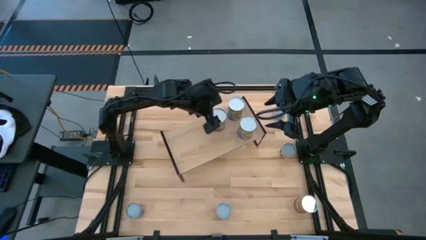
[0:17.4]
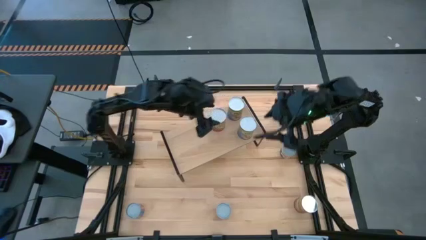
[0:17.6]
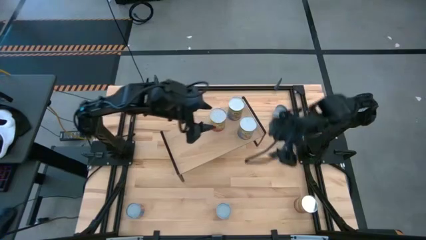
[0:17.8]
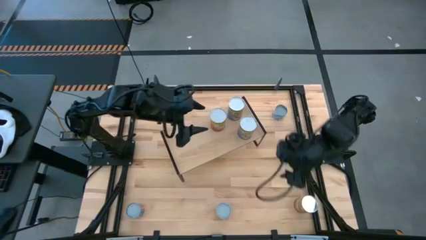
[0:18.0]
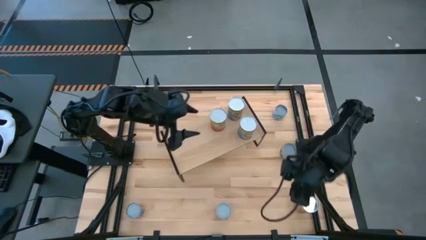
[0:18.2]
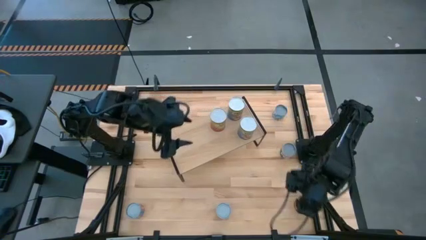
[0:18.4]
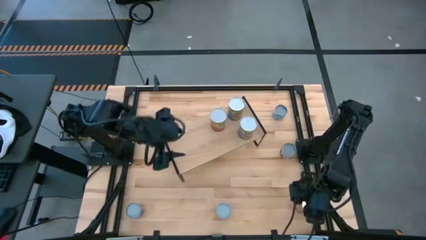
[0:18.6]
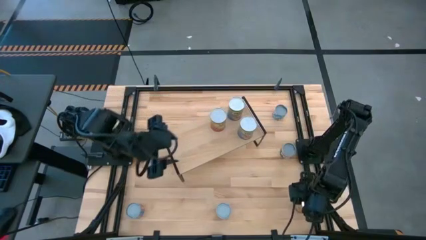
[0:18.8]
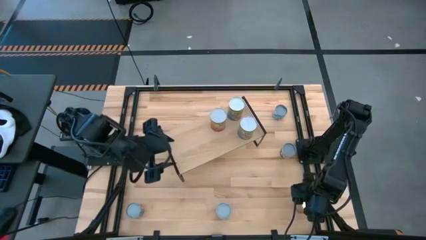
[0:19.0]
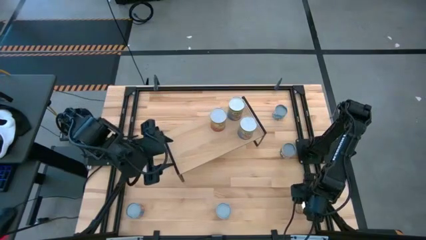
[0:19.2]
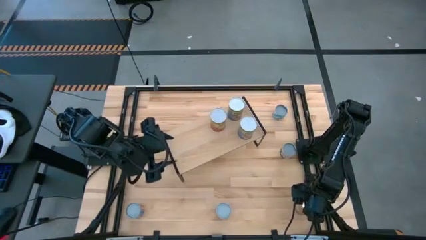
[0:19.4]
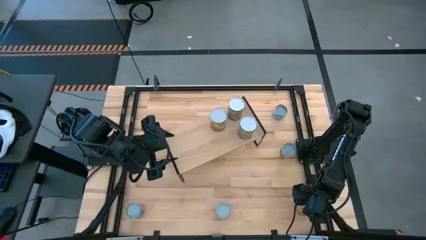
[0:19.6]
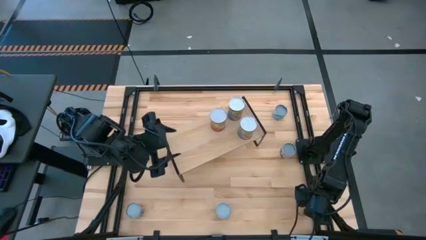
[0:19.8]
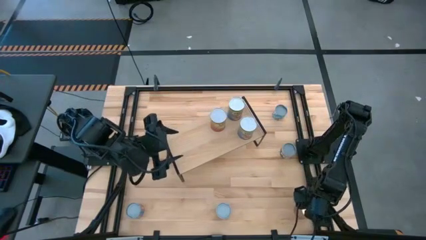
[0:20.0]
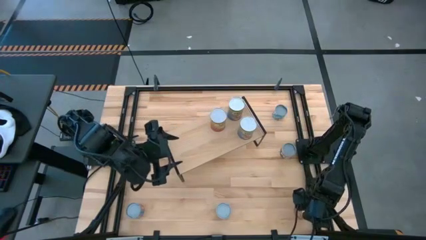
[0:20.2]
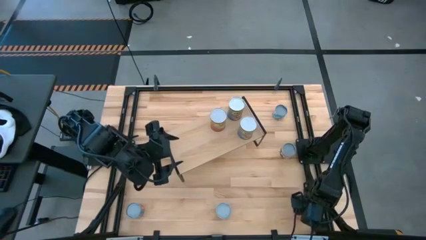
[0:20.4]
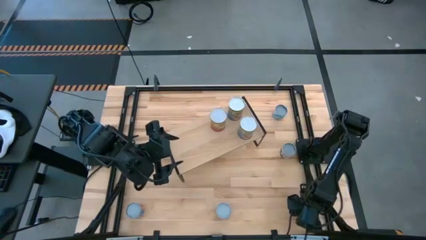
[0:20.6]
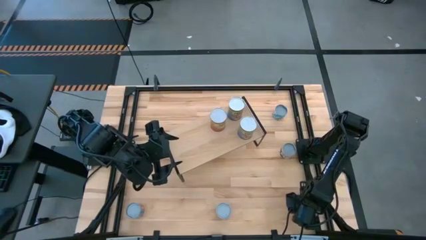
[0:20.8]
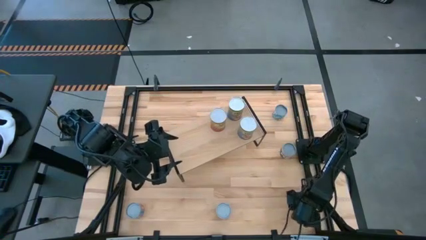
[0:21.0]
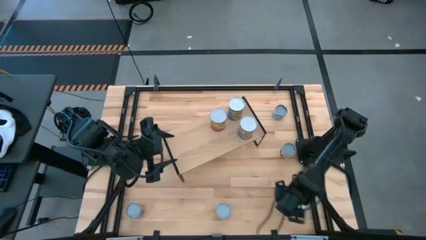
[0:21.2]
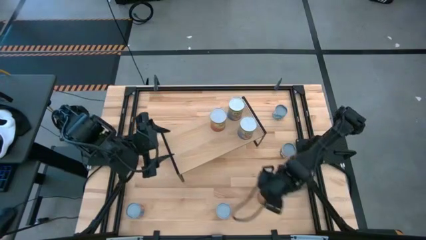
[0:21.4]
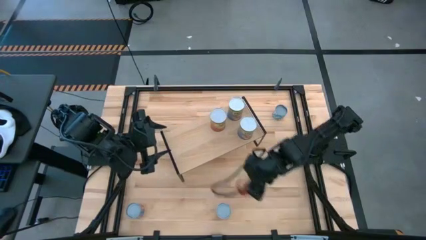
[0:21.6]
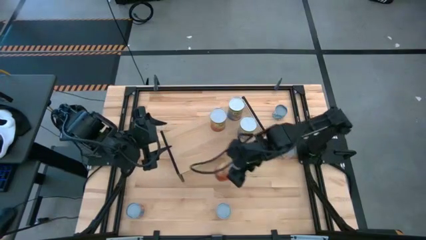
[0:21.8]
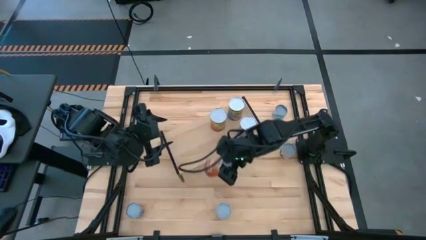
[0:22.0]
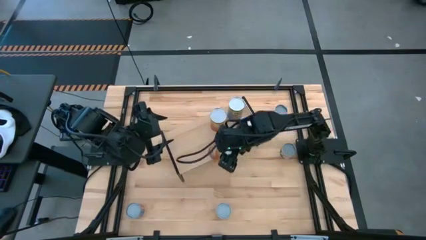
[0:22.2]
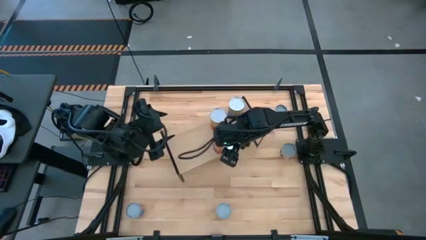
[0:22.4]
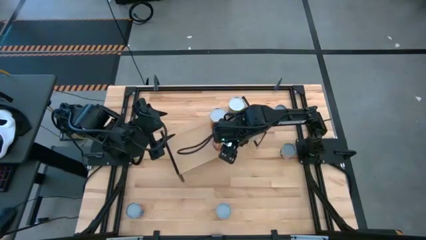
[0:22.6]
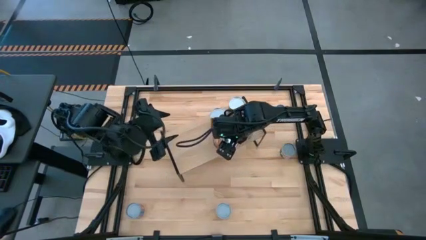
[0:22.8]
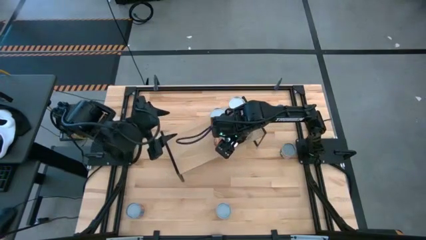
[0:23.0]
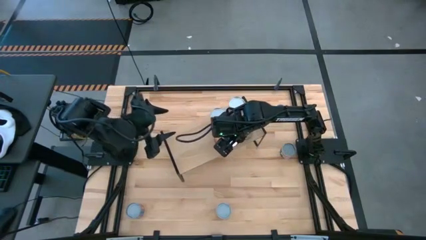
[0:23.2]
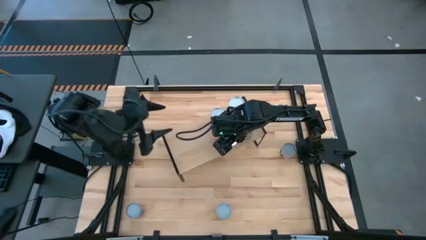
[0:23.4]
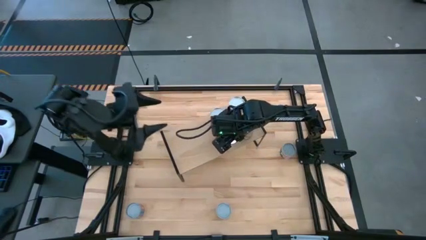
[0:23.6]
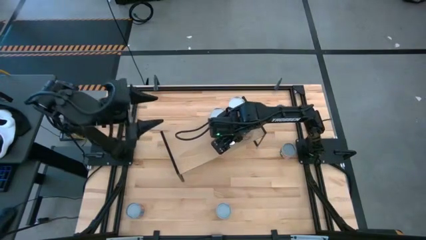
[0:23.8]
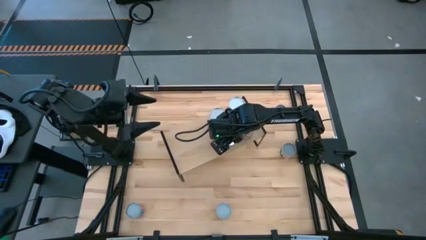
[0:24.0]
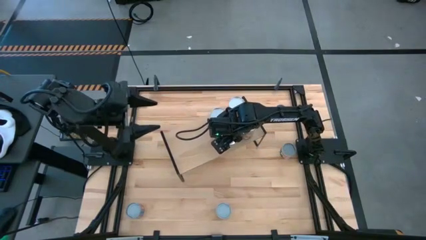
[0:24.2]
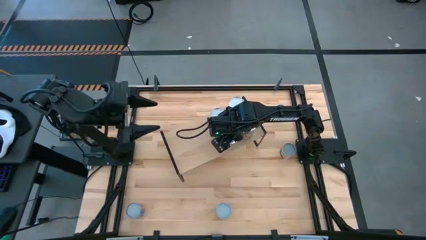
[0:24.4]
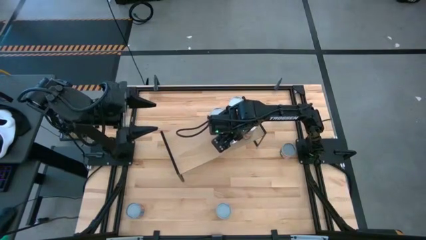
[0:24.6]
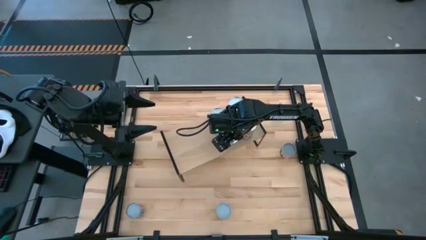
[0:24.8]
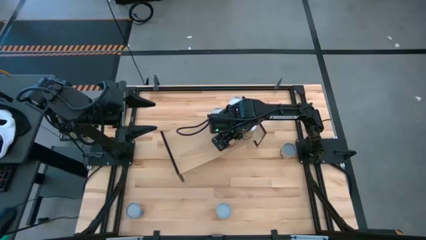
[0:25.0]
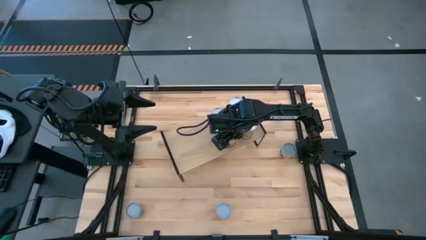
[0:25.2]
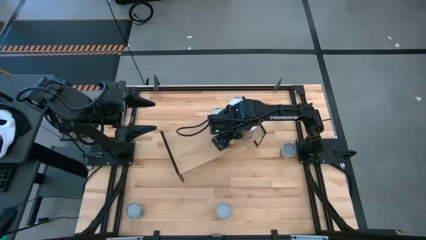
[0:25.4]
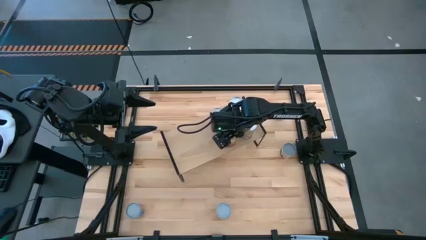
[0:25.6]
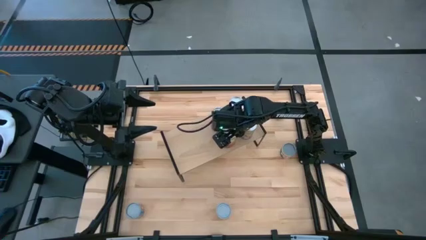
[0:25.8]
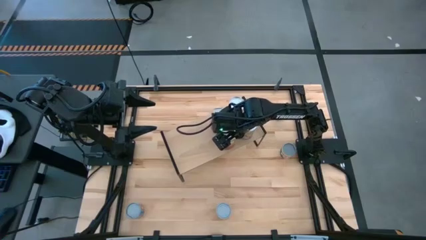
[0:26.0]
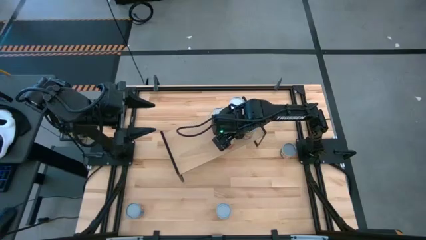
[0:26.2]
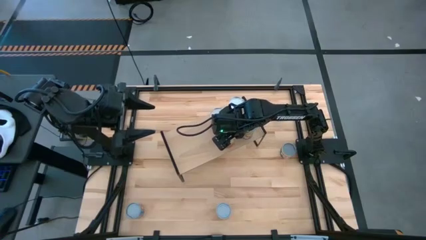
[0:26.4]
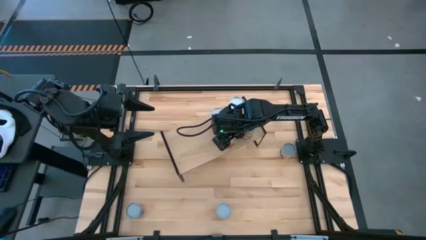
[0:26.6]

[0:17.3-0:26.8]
Task: Pick and place cans onto a shelf
Put the large canned corn on shelf

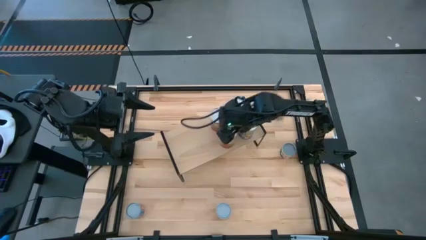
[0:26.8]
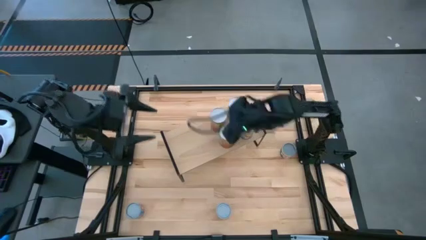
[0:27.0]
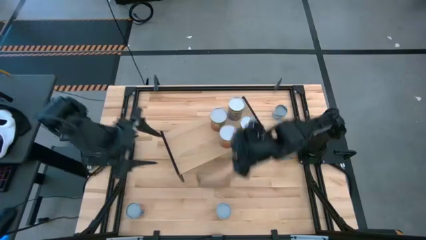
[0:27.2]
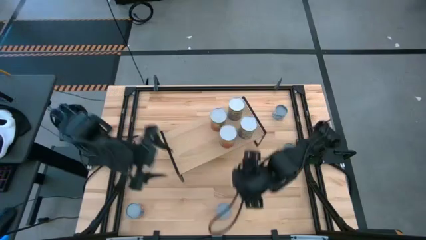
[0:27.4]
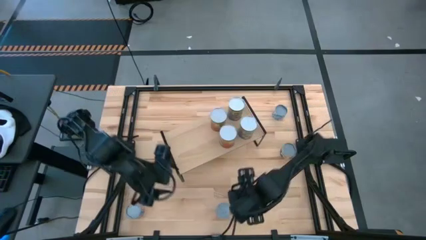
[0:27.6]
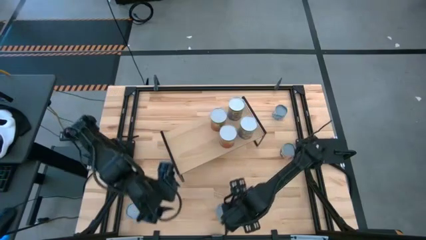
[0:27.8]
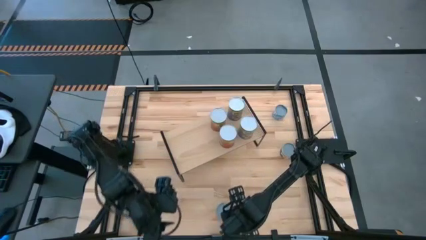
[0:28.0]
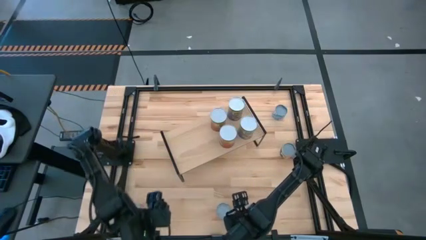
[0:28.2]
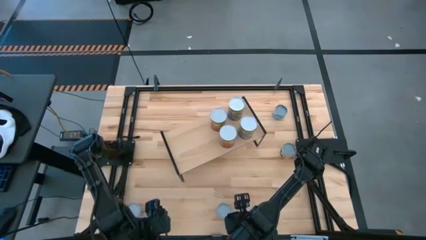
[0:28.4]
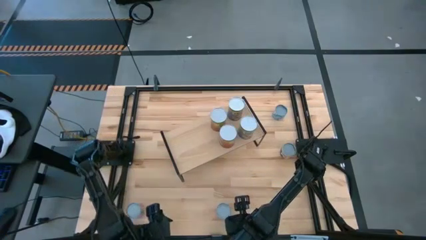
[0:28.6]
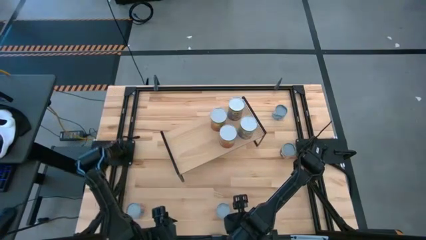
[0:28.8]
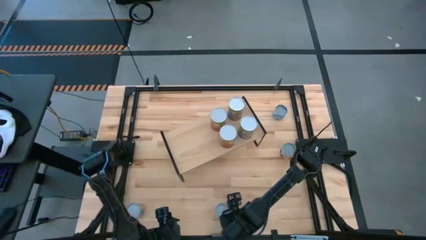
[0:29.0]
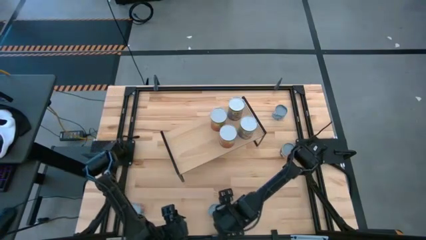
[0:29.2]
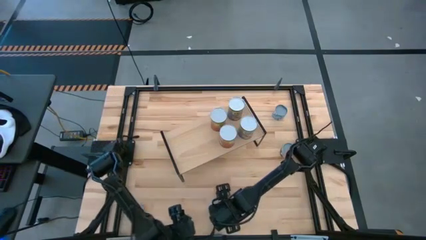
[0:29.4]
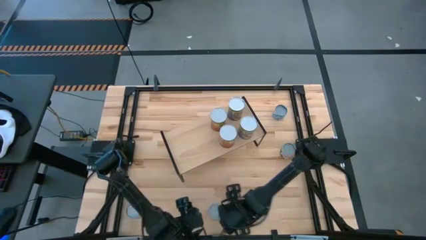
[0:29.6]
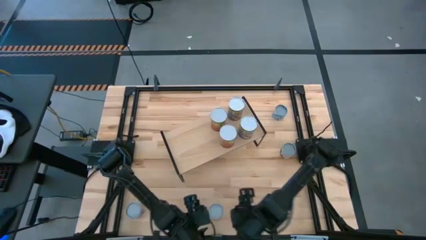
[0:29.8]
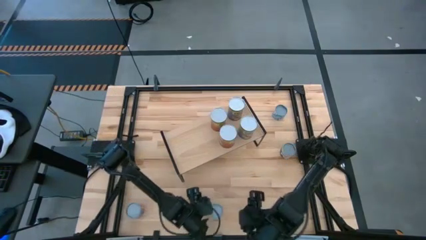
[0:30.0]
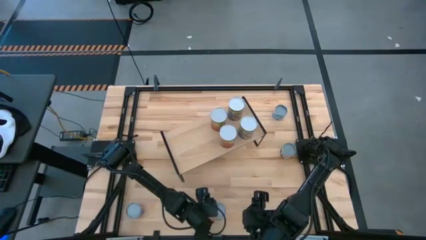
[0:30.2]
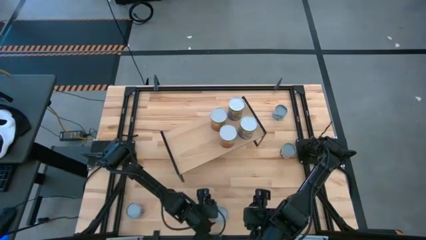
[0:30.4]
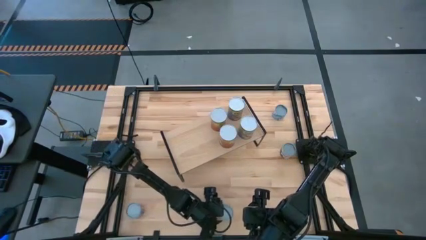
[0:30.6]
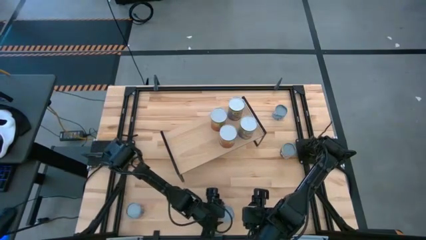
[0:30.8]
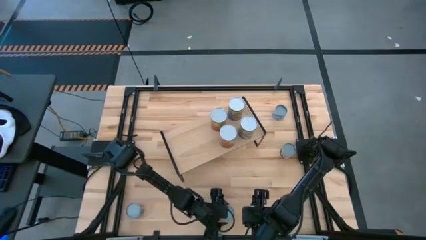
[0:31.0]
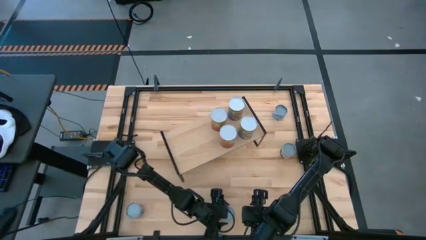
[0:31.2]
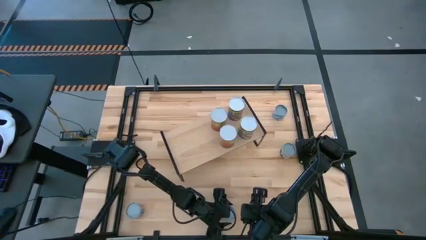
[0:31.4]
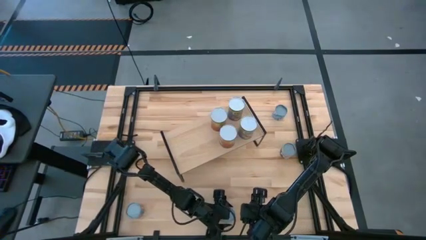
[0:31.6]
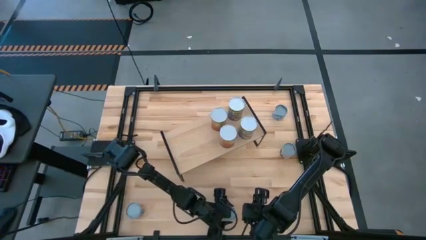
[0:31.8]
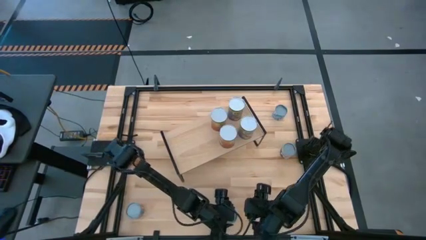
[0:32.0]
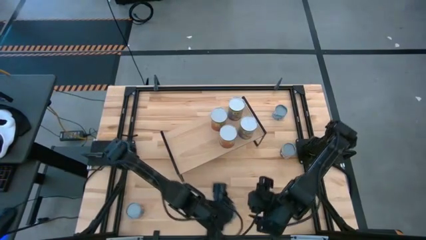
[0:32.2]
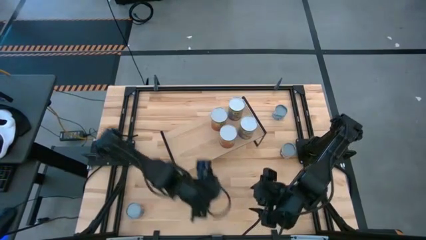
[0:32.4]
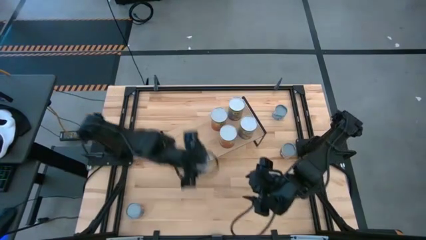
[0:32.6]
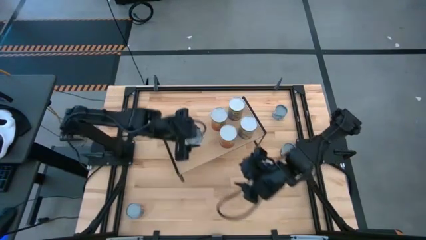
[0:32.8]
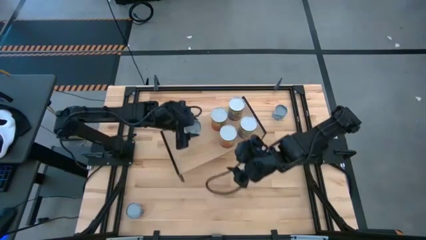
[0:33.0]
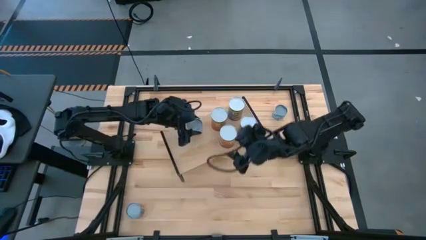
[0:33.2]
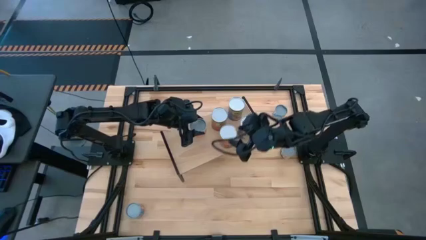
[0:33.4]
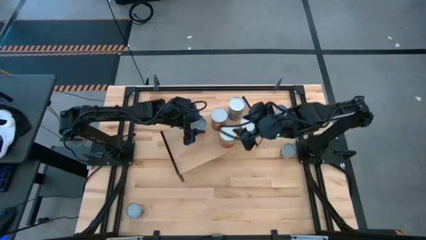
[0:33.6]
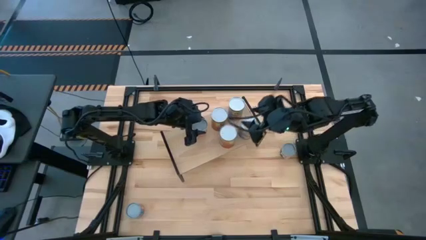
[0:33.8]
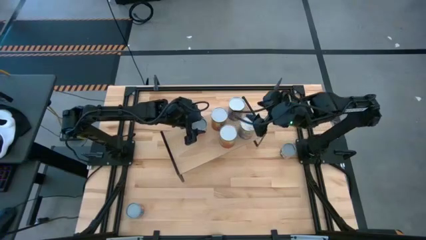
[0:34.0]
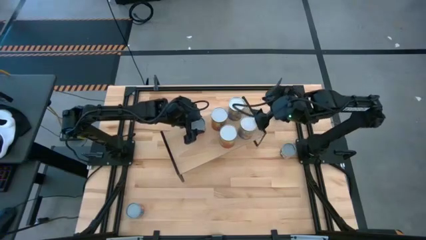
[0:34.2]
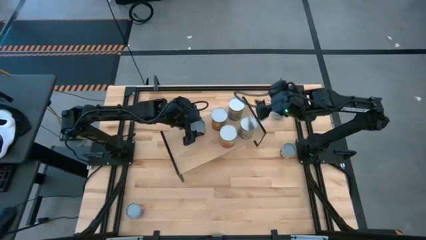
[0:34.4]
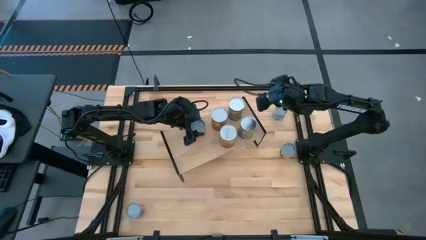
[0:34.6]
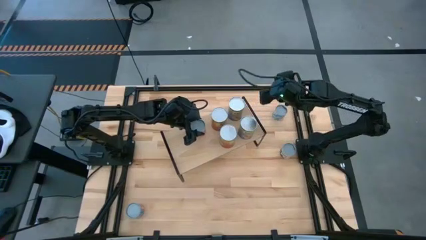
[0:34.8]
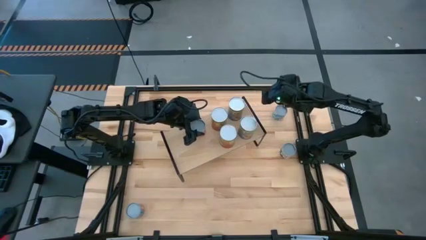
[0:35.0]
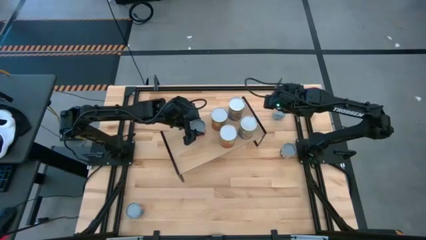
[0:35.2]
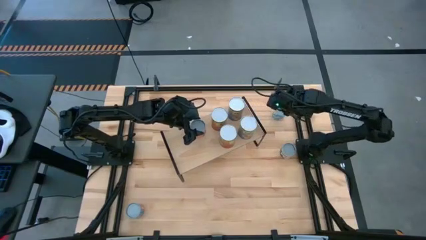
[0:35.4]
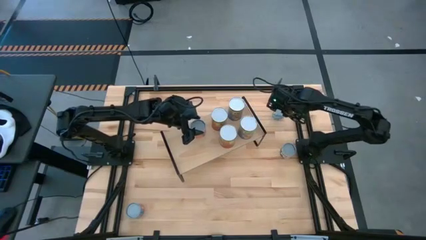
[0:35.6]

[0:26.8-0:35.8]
Put the small canned orange on the shelf
